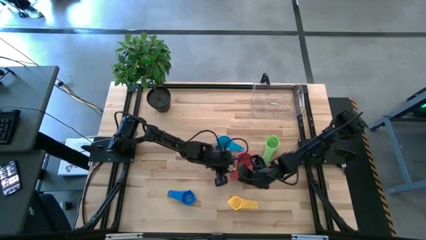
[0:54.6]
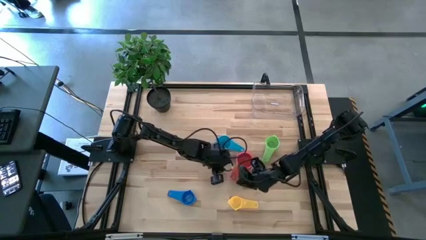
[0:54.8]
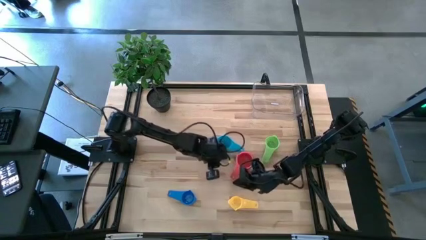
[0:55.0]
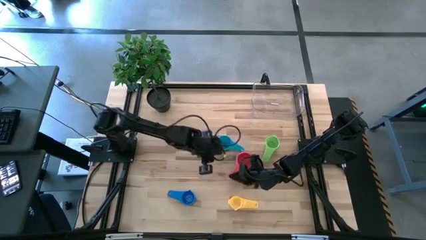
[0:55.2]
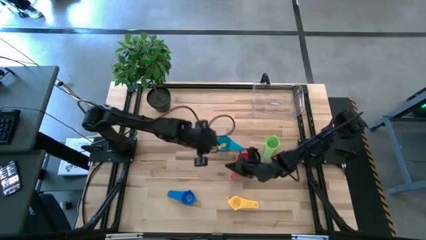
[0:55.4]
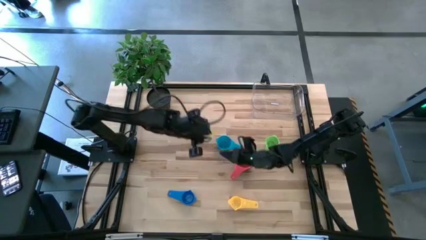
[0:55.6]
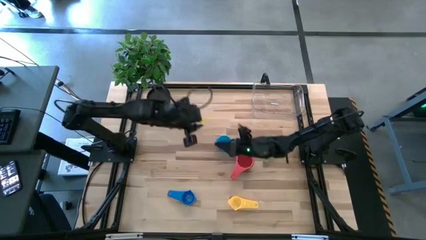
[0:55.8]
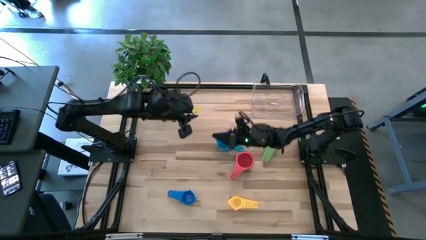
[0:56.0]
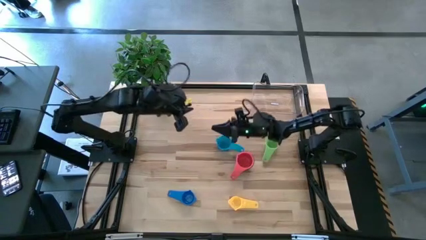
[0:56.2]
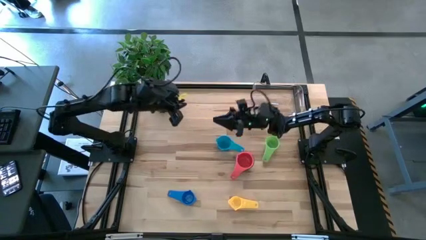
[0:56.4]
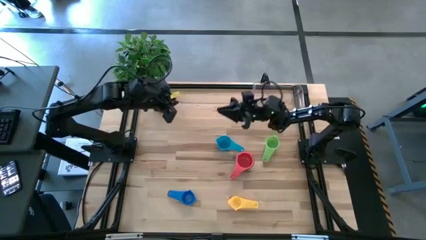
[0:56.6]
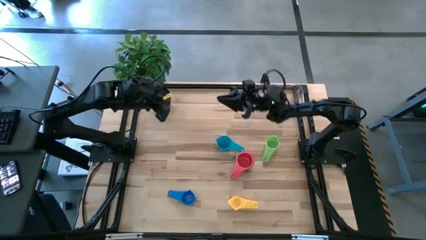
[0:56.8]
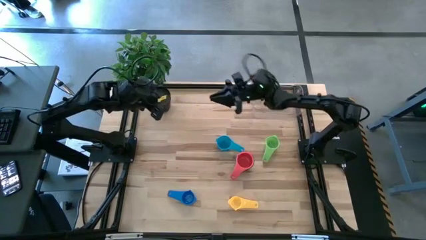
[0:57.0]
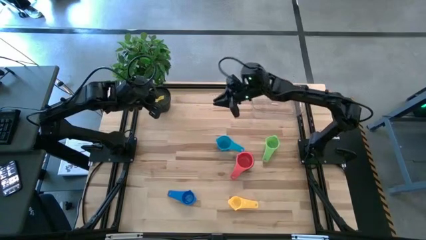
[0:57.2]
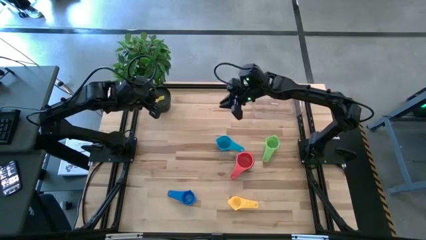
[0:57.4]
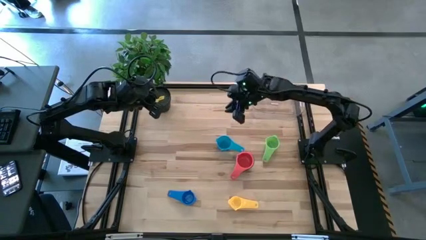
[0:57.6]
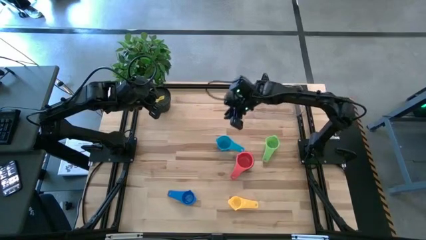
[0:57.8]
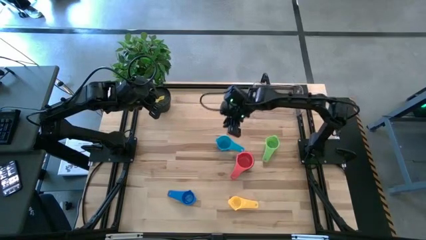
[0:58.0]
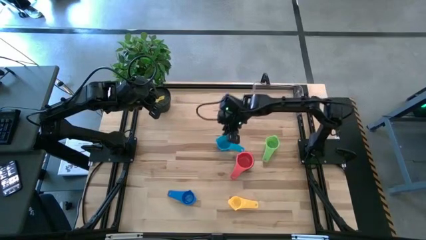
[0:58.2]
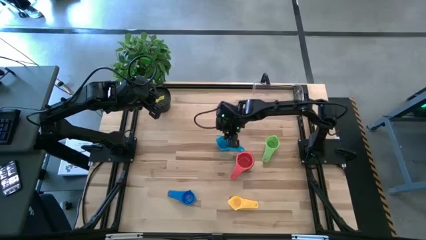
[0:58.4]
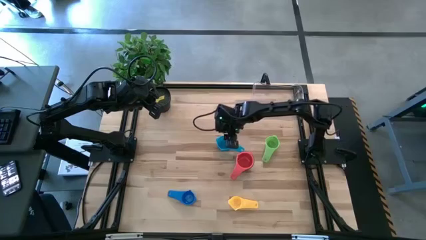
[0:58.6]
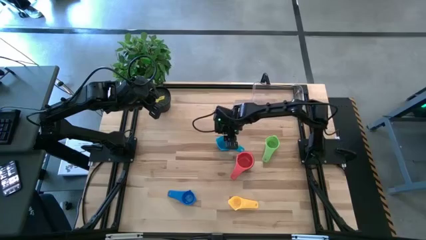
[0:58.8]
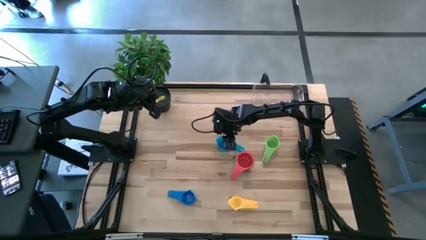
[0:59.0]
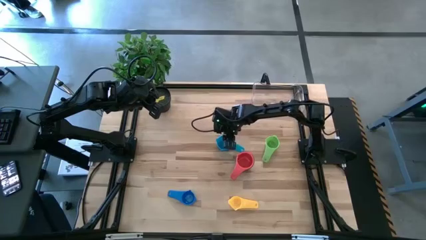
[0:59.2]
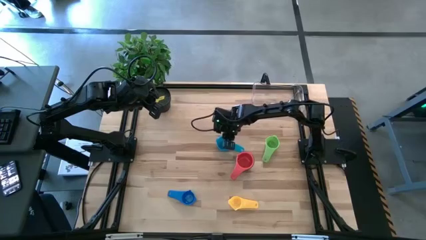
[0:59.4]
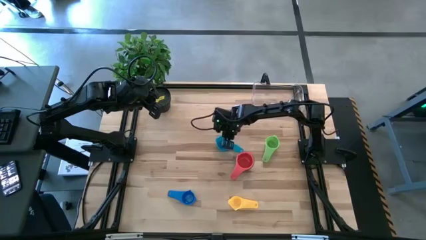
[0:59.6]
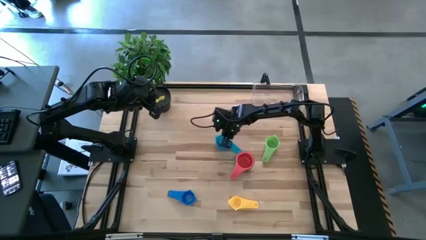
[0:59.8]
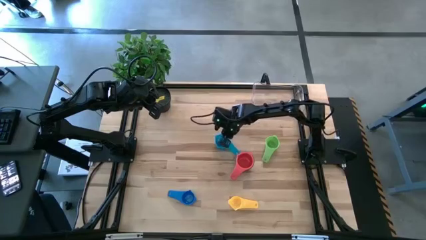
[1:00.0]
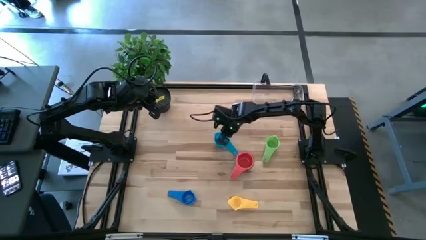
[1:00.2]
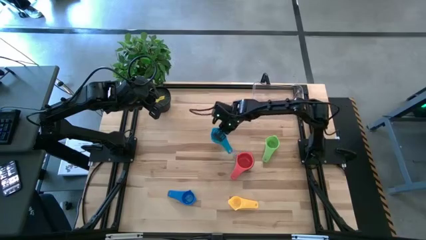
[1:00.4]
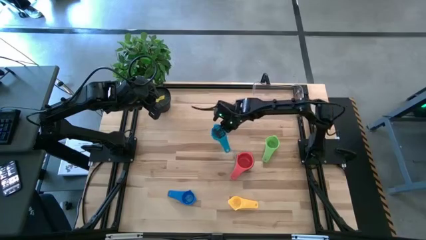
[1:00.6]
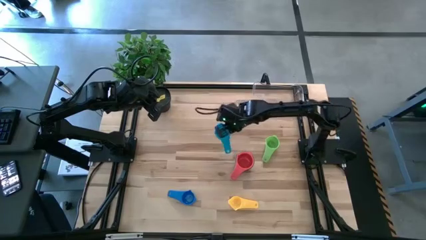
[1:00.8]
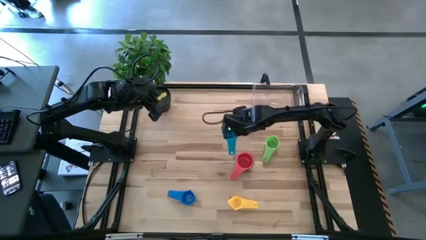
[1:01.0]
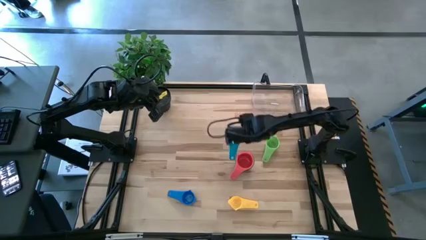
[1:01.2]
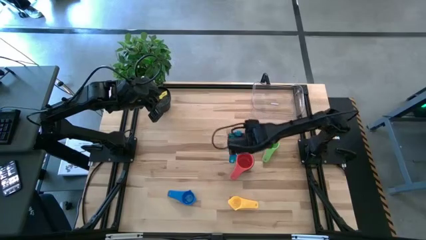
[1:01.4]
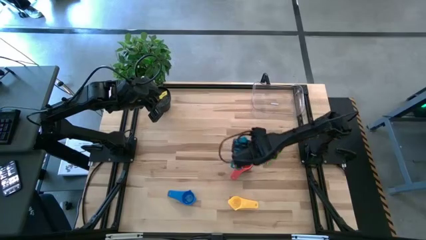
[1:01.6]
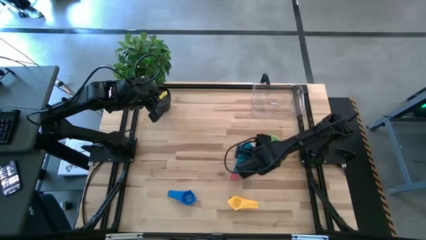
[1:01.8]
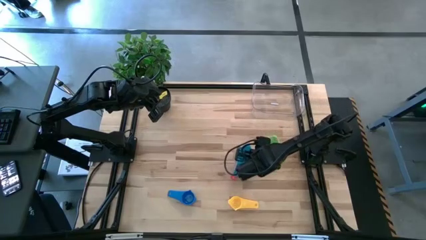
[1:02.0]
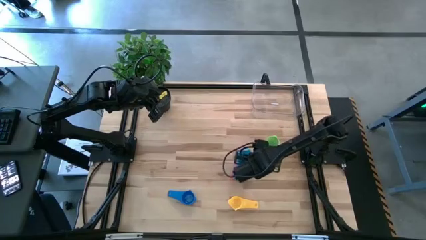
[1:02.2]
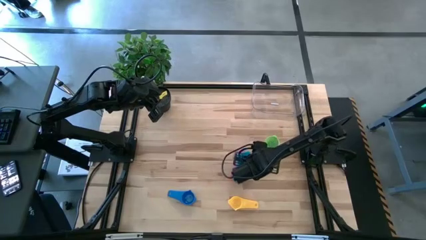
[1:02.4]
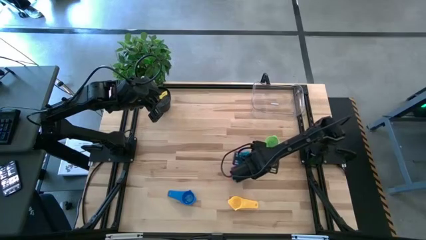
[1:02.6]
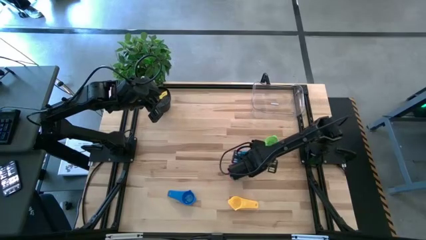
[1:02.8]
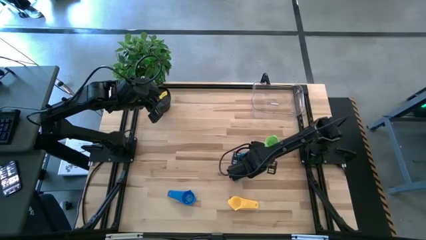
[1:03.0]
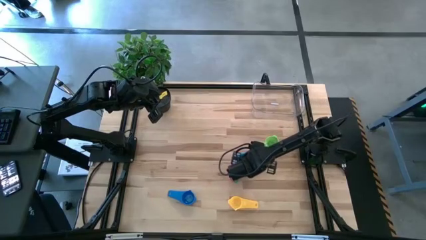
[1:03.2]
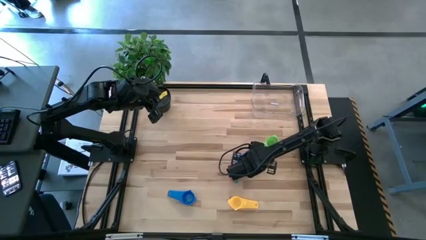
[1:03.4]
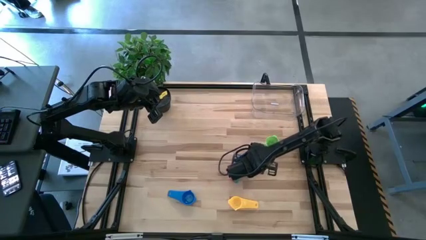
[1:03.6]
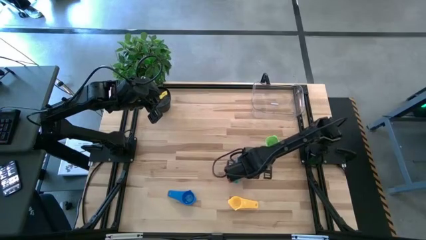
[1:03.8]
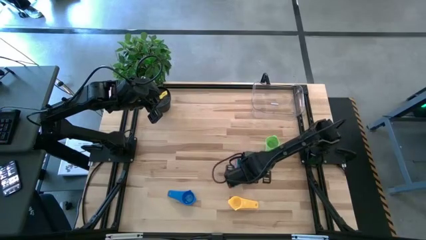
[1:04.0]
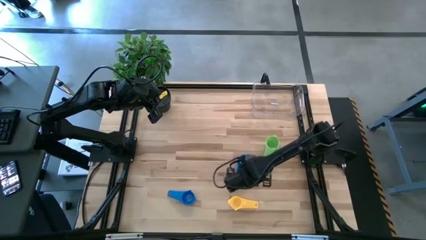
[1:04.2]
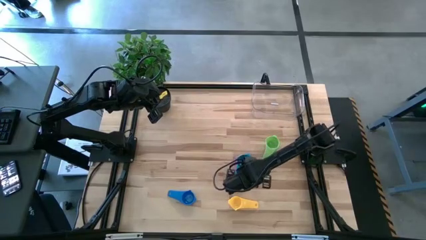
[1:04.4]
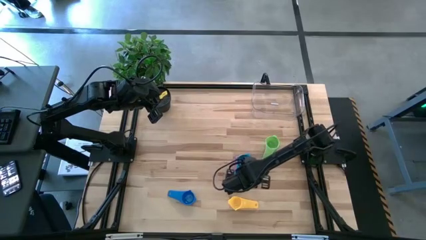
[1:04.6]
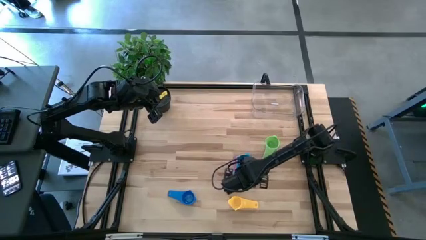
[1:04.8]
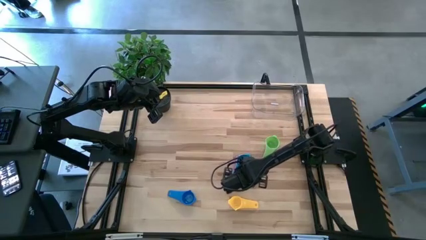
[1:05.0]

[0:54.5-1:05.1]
Task: Nest measuring cups in basket
Stack the light blue measuring cup on top of the red measuring cup

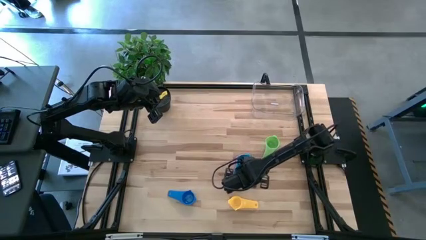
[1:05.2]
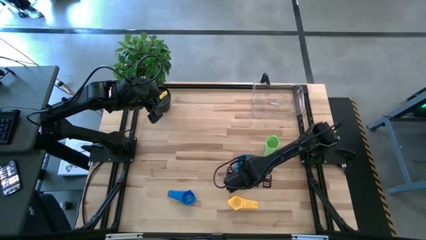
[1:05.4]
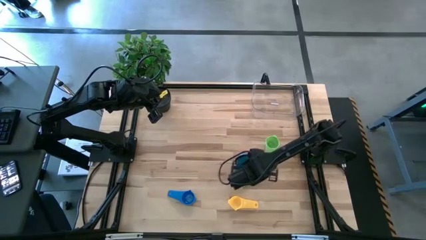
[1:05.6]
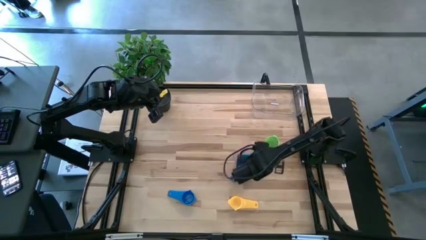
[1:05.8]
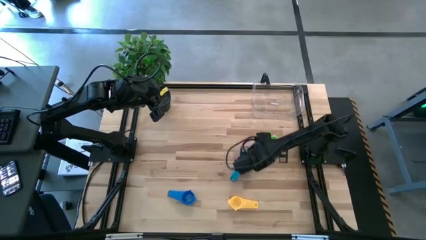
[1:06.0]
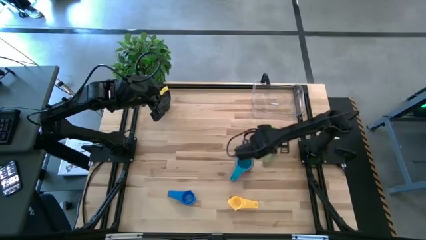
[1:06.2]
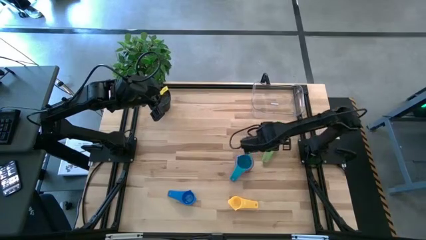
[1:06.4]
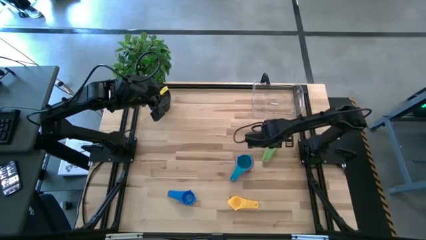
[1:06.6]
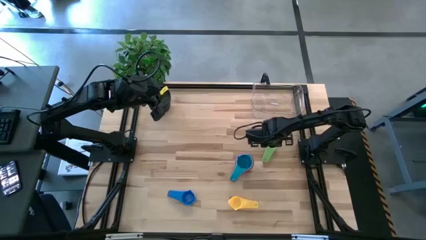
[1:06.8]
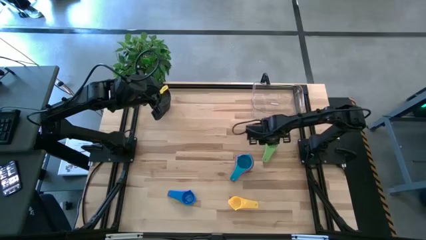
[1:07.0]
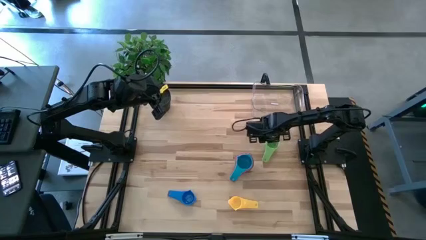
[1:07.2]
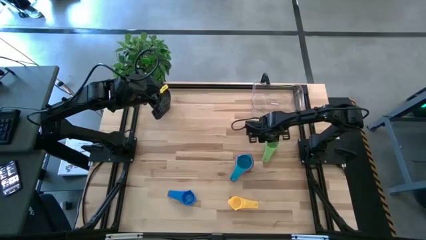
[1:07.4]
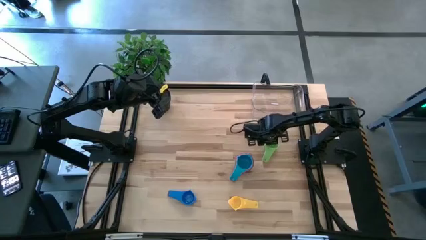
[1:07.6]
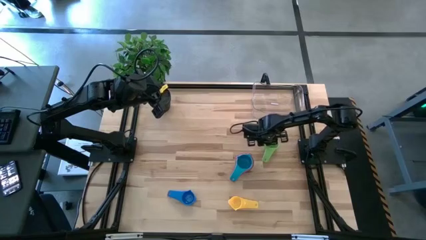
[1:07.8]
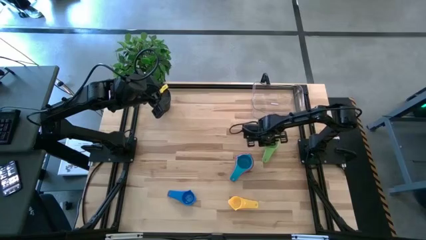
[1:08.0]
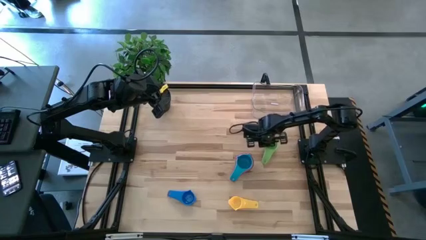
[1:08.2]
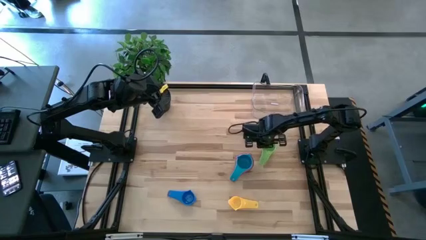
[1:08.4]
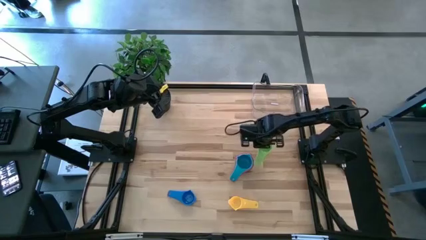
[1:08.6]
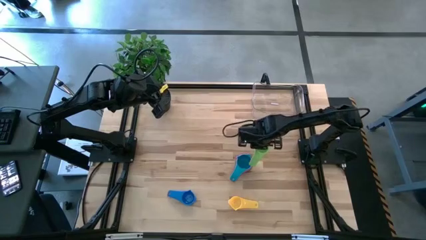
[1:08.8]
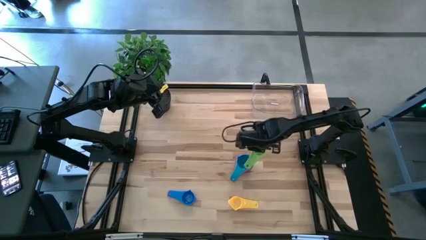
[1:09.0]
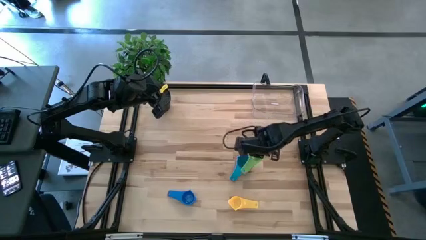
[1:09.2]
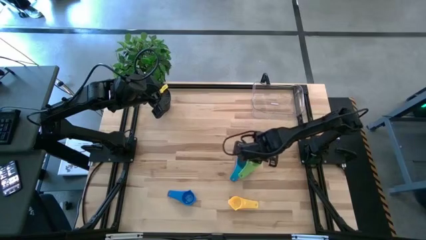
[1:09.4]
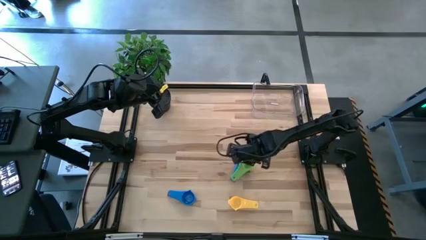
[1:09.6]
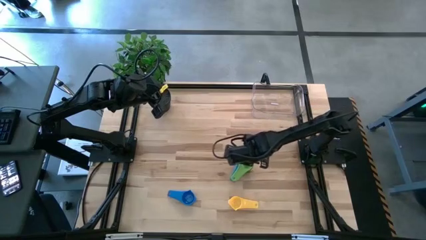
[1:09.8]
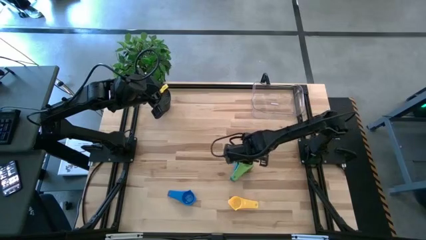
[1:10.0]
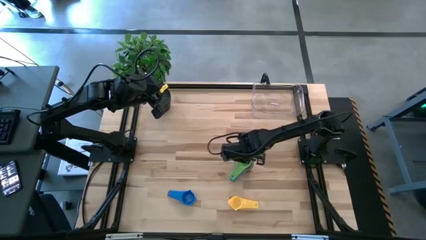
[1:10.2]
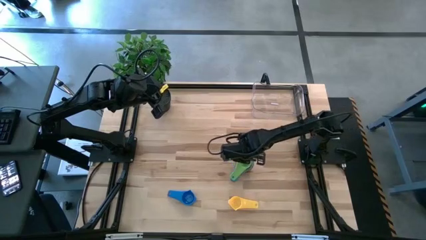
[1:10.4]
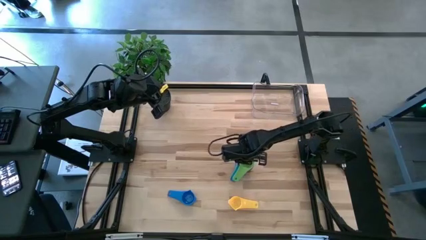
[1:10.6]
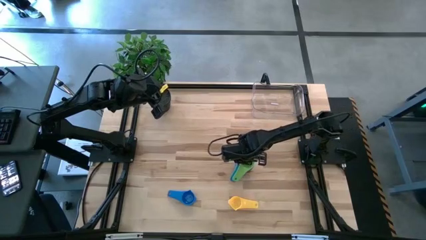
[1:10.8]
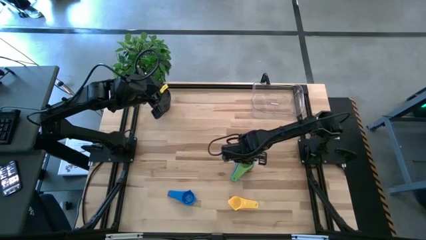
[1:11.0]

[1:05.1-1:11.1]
Stack the green measuring cup on top of the light blue measuring cup
